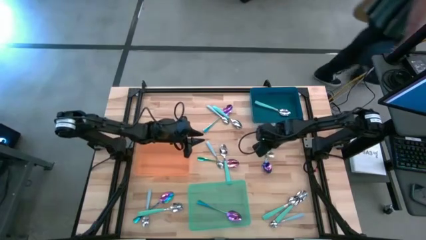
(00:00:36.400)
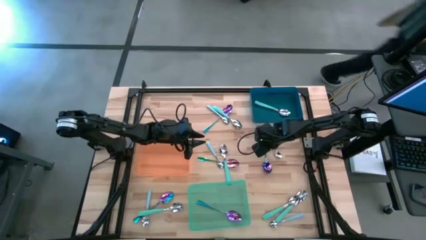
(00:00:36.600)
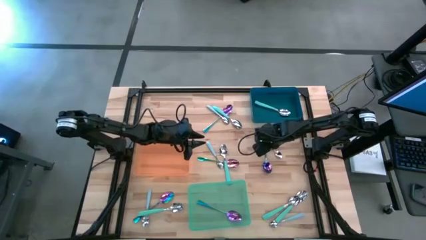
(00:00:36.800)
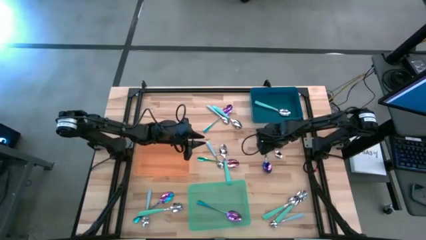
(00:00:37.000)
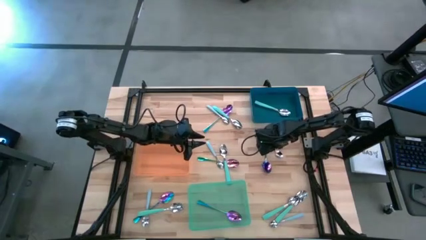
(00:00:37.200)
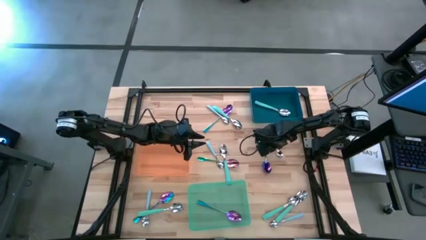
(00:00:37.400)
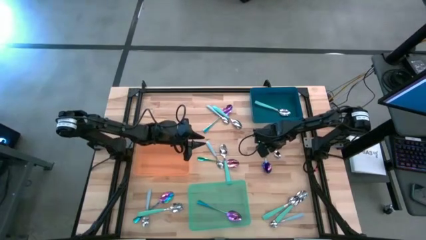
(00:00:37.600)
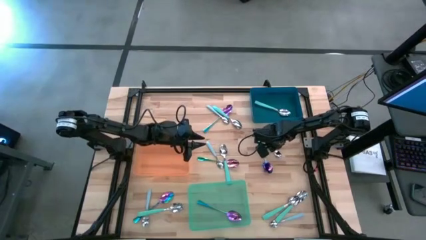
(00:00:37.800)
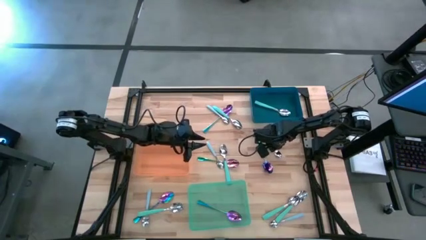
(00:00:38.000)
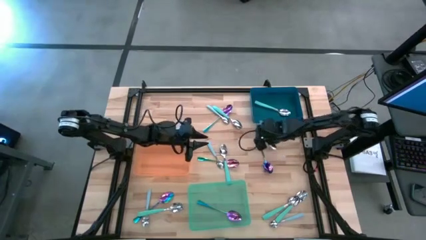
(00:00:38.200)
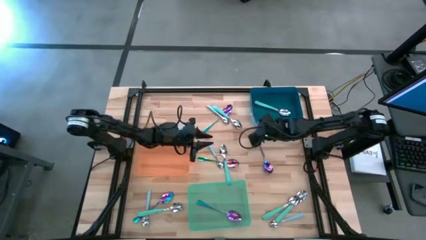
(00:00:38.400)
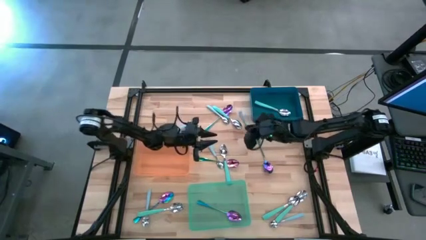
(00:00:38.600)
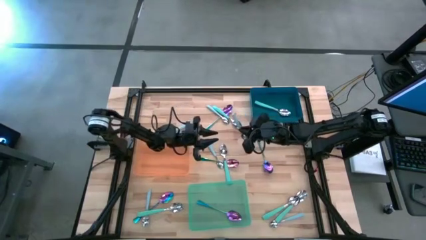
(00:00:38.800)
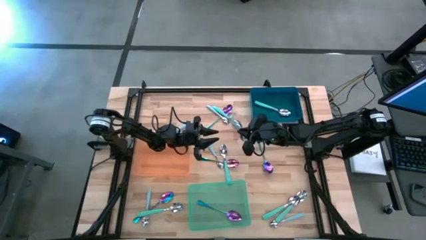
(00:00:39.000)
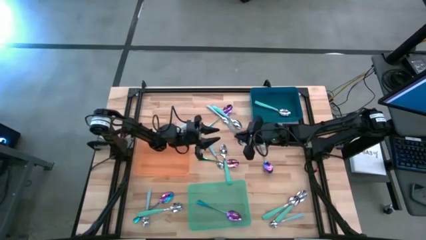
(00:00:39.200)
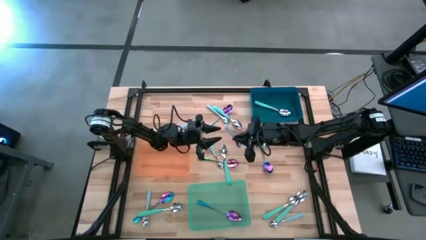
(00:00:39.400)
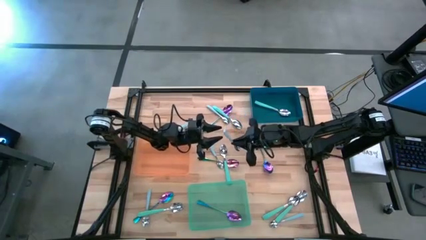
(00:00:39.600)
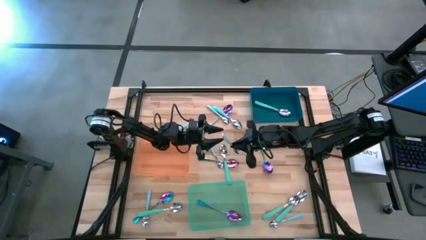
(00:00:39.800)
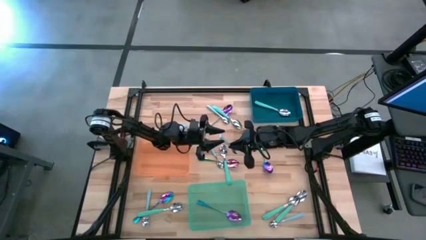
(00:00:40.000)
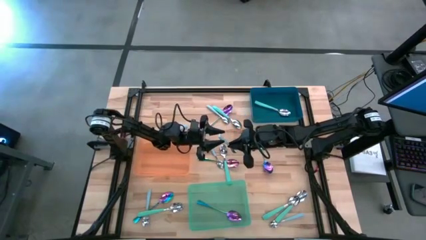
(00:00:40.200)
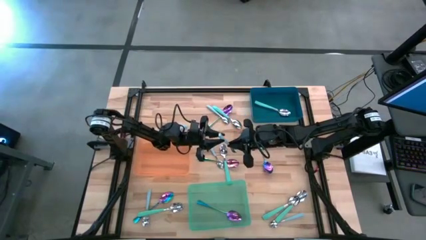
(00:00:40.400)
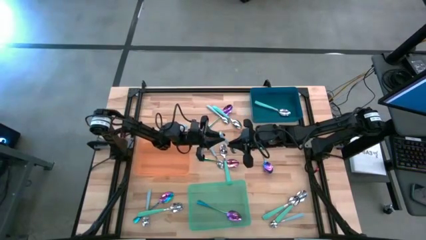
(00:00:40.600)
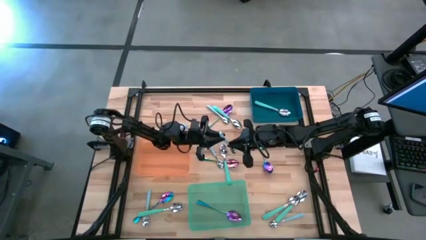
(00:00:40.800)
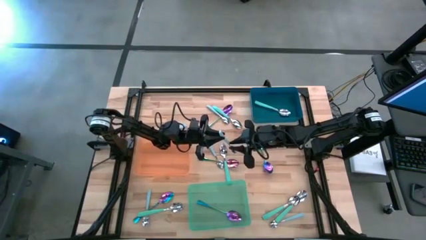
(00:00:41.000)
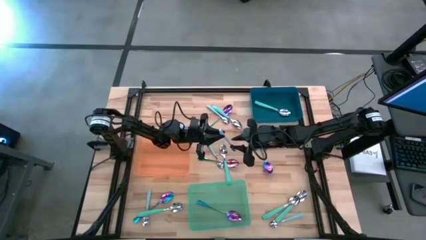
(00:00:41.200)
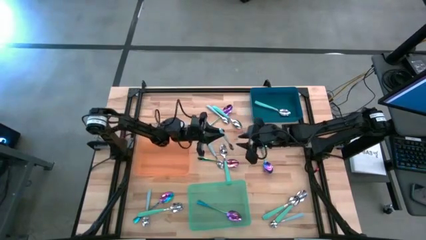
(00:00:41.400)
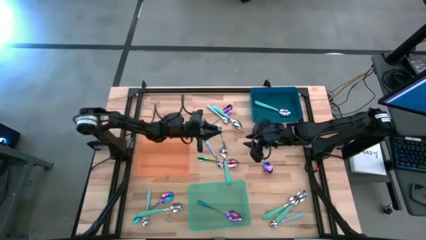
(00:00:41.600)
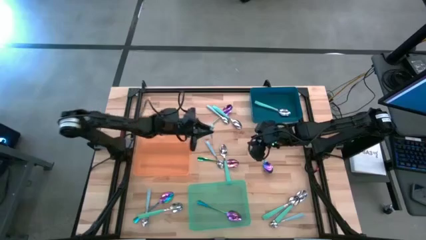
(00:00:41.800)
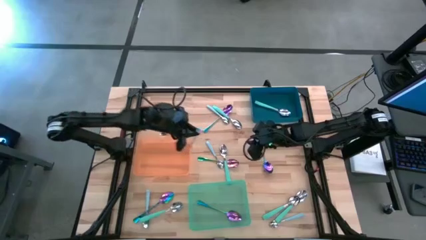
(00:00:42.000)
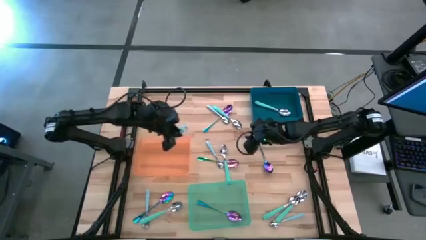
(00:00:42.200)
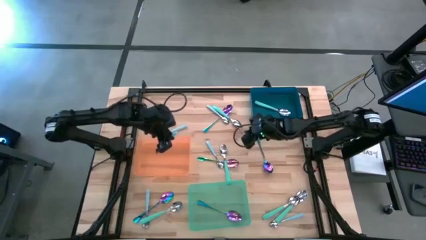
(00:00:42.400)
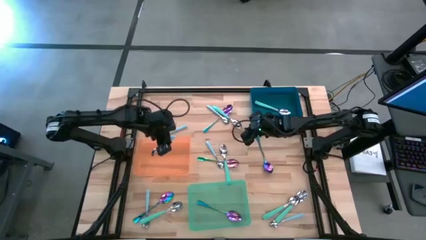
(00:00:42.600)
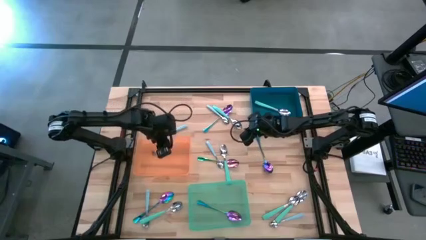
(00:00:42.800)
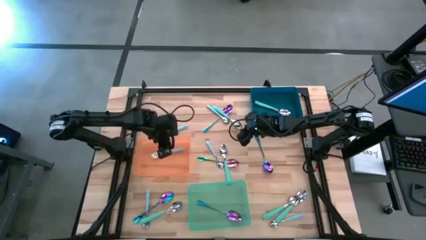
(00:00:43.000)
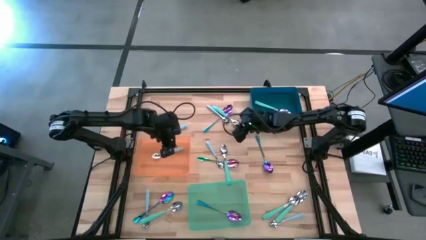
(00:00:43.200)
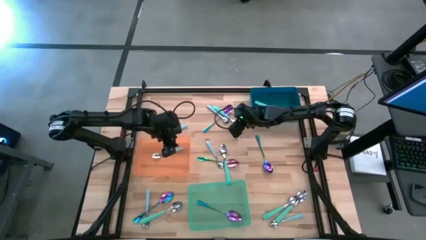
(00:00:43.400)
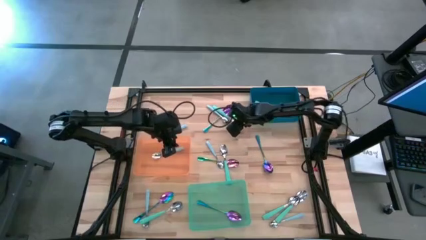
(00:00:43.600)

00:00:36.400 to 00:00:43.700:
Task: Sort silverware by color (type)
Put the blue spoon into the orange bin

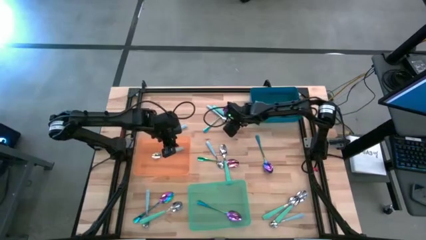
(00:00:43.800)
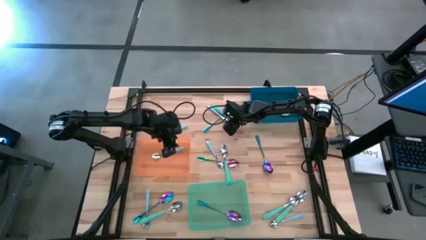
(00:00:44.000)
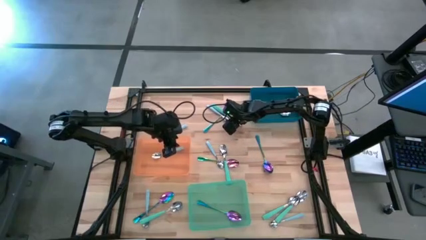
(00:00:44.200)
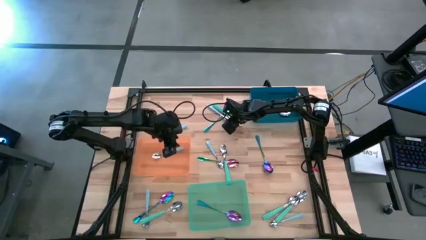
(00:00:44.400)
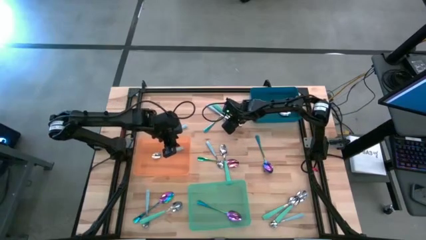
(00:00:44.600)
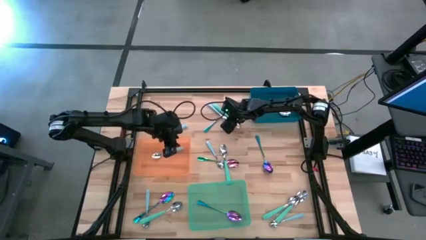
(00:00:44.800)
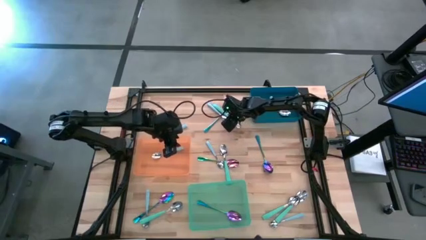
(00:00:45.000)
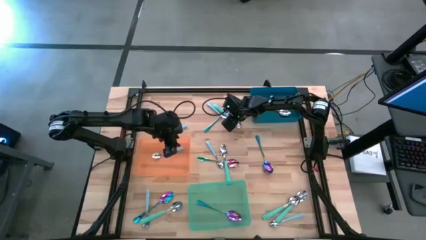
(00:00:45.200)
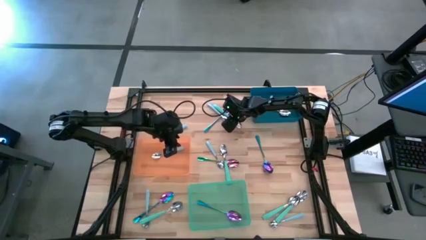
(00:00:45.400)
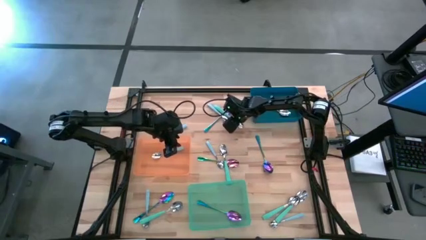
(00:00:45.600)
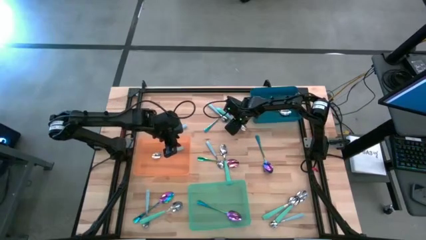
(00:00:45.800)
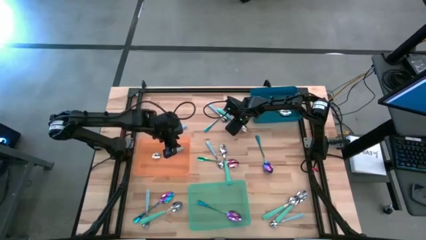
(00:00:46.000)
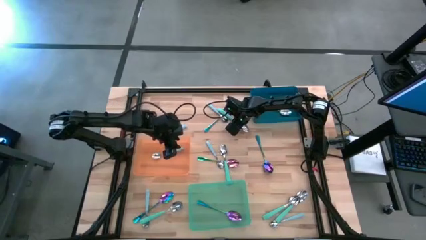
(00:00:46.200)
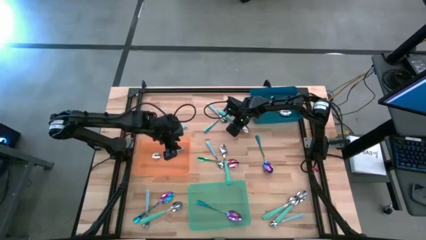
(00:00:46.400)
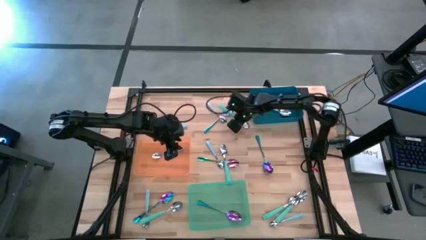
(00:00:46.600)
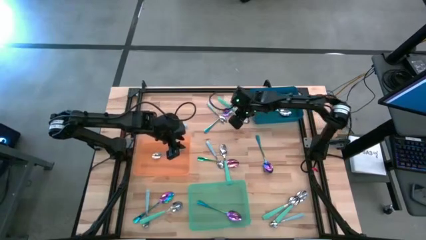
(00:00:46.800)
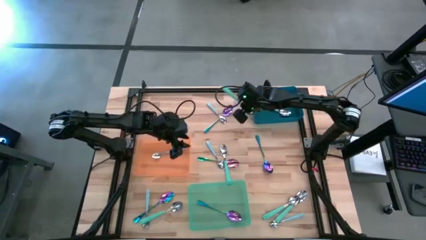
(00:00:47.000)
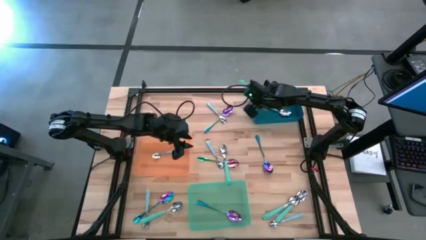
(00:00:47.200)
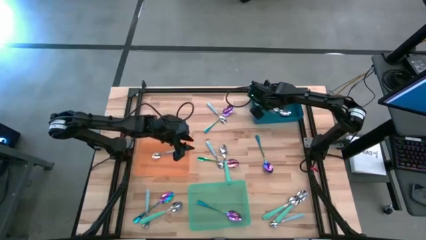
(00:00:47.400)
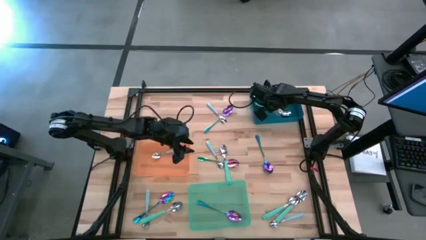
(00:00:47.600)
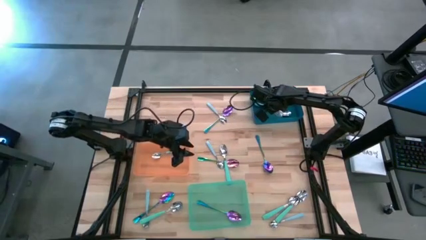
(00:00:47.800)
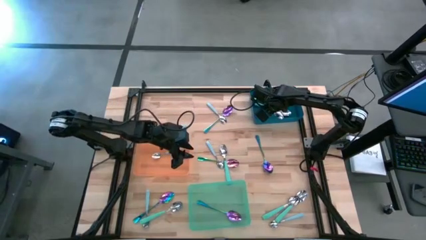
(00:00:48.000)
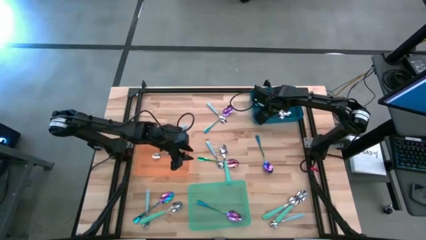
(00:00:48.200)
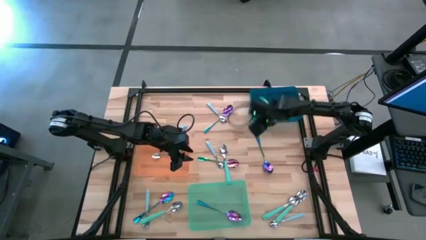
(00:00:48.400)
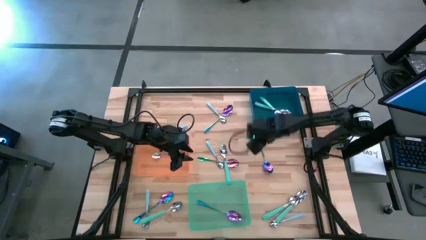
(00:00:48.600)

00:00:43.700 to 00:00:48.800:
Put the top center green spoon into the blue bin

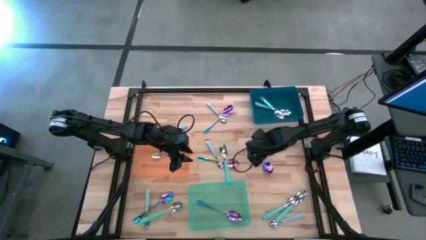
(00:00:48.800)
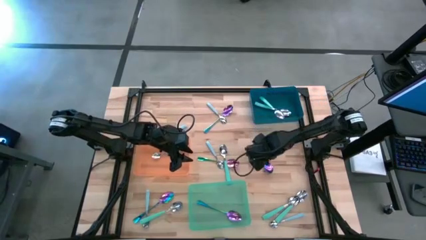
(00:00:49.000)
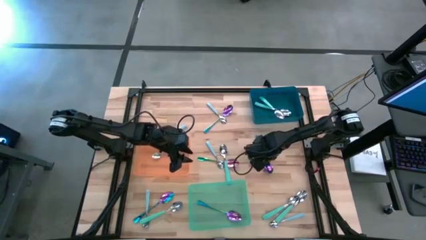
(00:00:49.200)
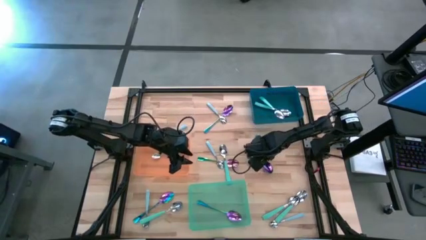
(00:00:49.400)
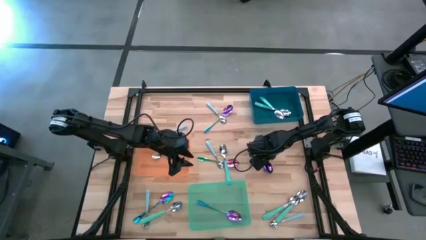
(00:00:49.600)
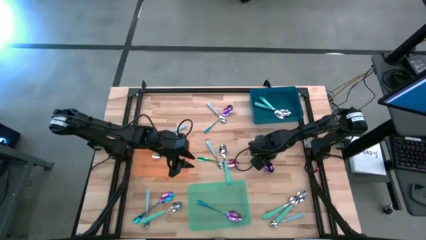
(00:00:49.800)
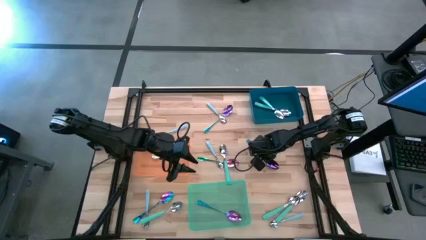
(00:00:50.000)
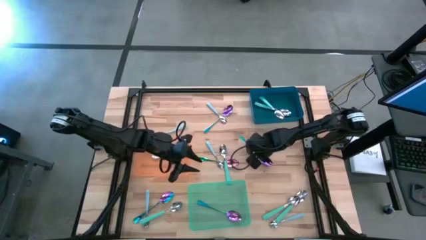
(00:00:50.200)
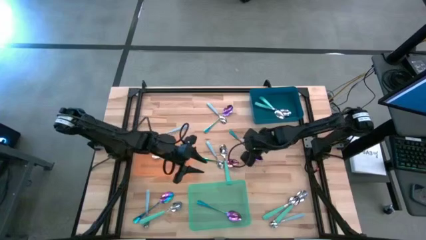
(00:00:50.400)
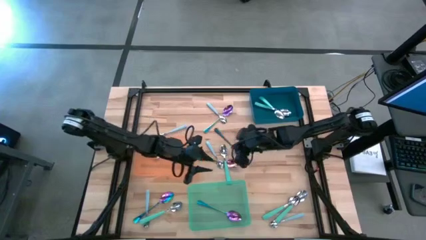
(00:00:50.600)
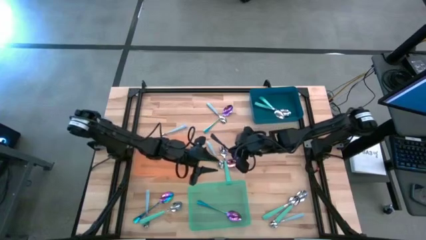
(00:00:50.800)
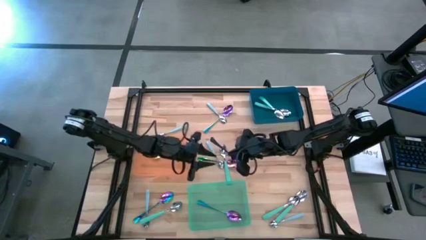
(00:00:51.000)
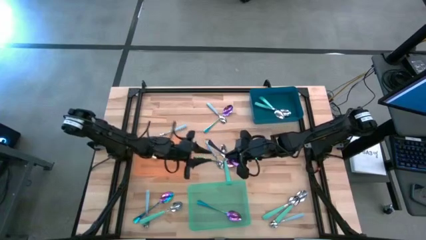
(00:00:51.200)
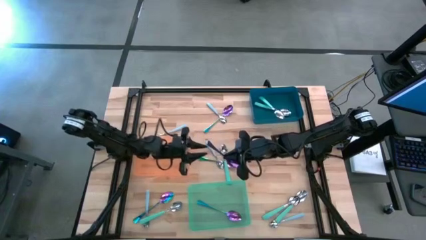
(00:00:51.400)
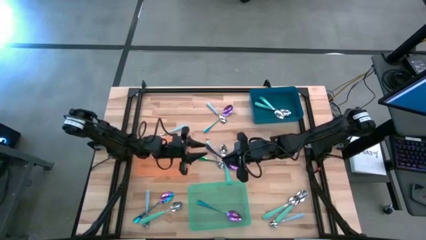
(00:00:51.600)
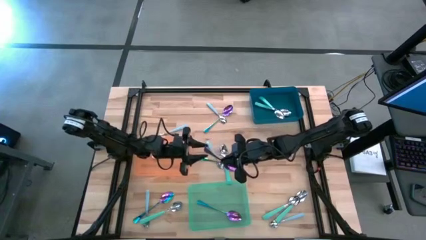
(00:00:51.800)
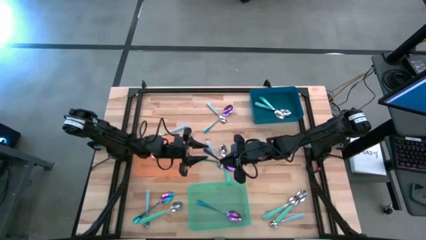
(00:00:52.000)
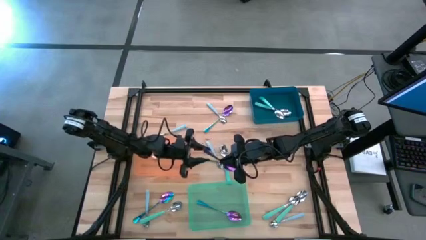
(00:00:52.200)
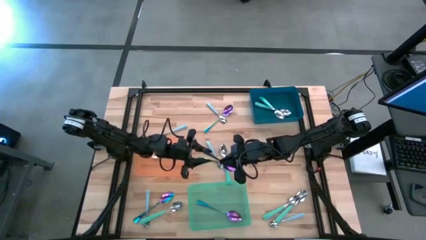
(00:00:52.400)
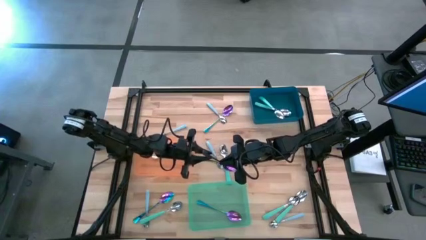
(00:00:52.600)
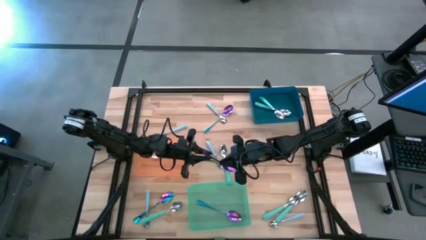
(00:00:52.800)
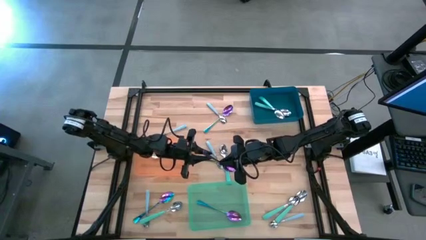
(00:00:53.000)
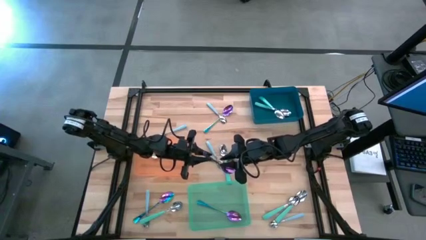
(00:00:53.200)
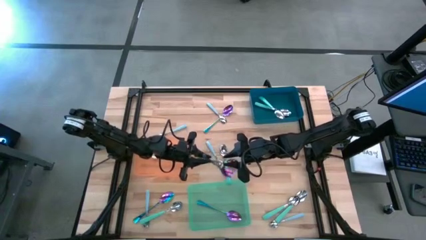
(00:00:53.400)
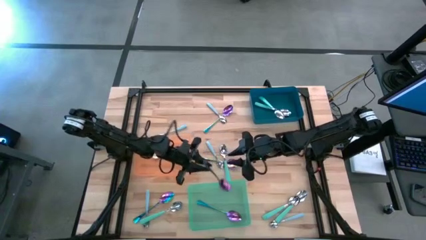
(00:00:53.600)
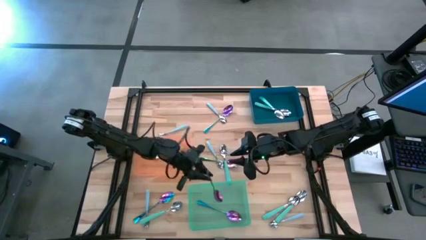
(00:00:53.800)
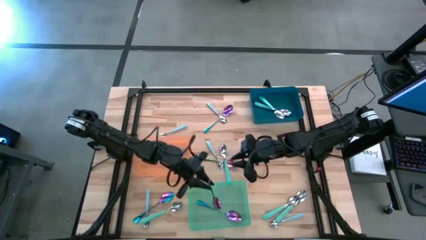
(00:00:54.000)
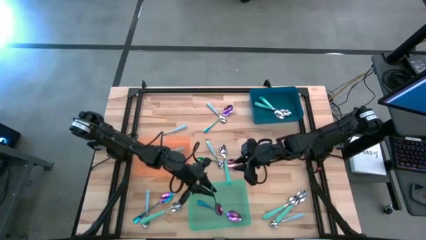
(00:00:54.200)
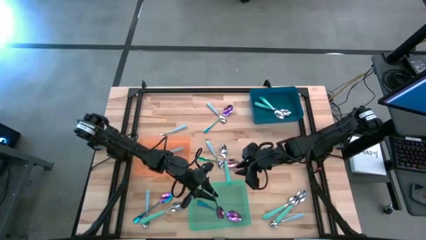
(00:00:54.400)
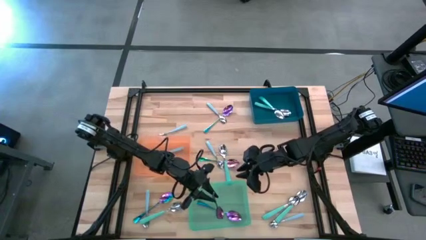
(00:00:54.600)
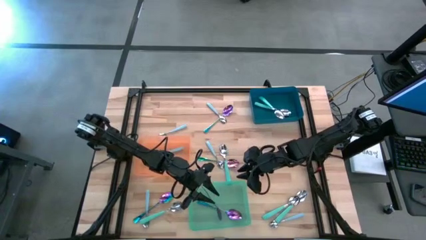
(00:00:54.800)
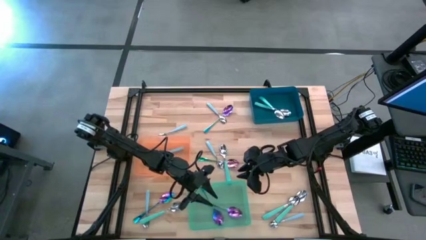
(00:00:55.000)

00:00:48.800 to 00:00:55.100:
Put the middle left purple spoon into the green bin
